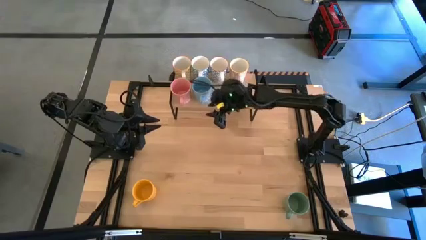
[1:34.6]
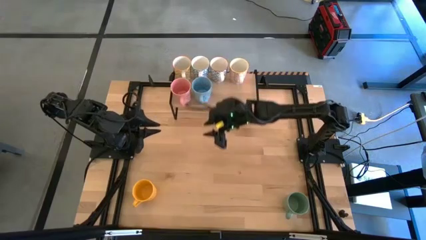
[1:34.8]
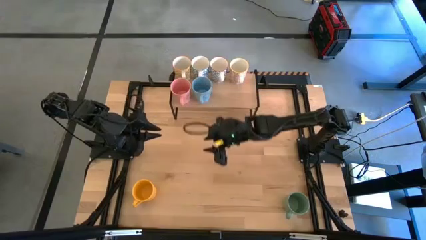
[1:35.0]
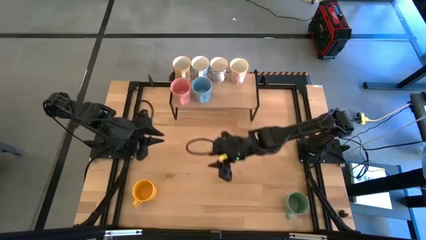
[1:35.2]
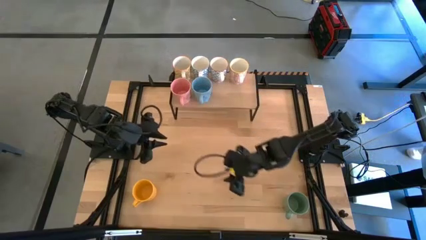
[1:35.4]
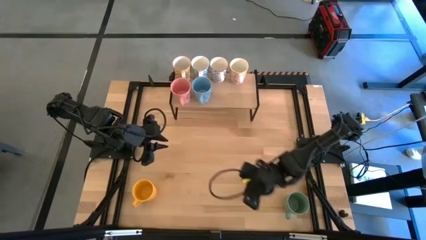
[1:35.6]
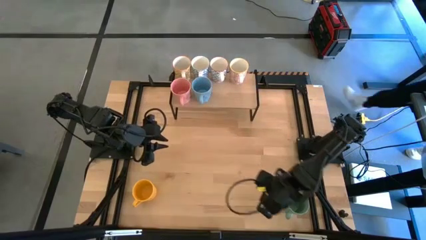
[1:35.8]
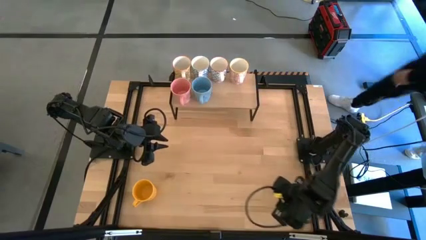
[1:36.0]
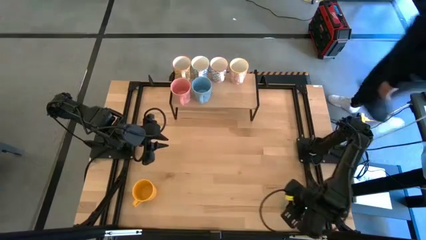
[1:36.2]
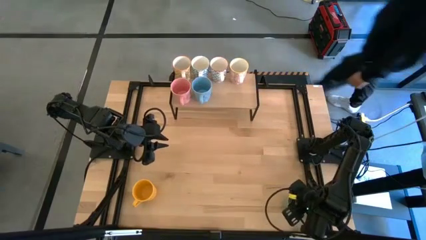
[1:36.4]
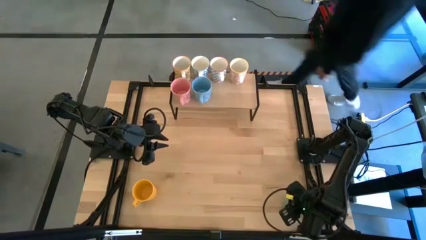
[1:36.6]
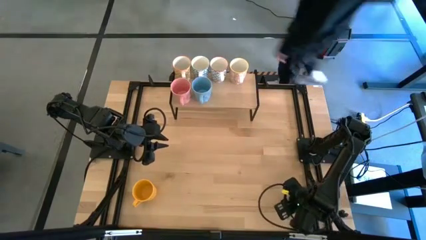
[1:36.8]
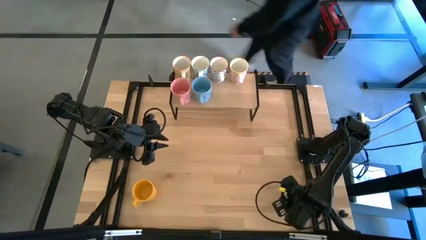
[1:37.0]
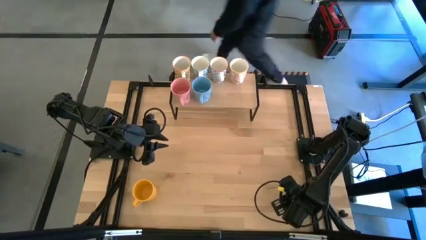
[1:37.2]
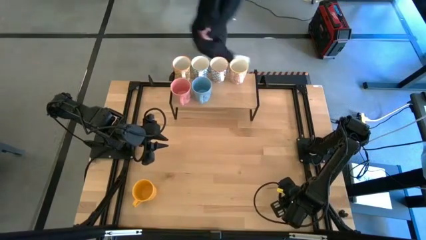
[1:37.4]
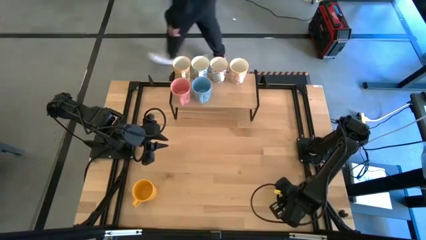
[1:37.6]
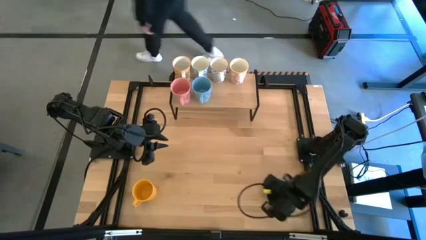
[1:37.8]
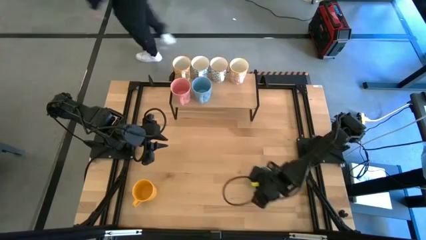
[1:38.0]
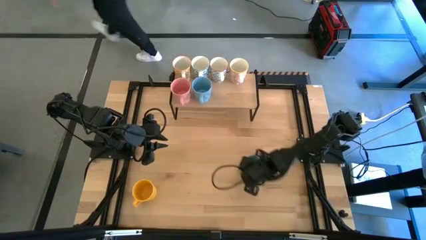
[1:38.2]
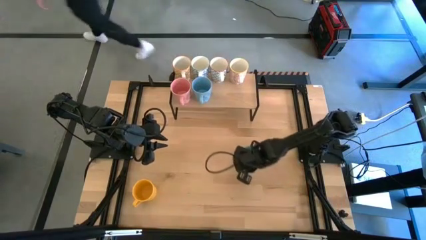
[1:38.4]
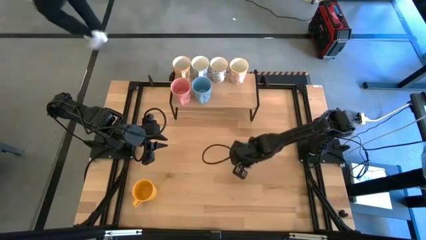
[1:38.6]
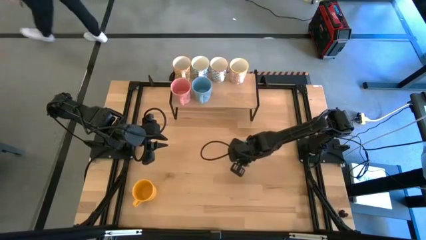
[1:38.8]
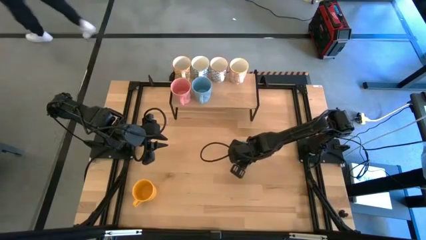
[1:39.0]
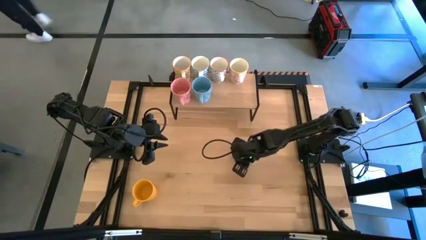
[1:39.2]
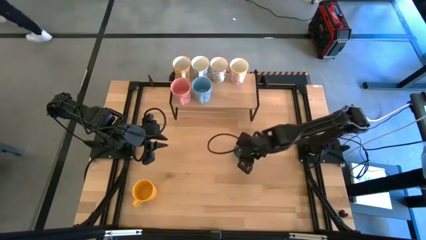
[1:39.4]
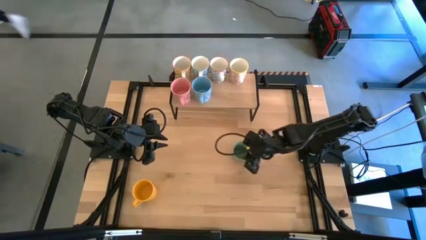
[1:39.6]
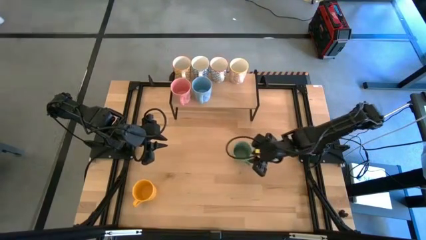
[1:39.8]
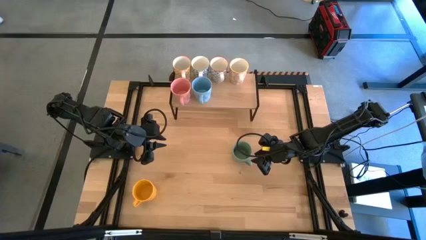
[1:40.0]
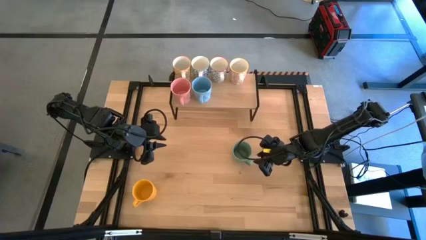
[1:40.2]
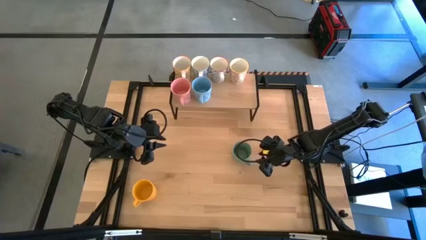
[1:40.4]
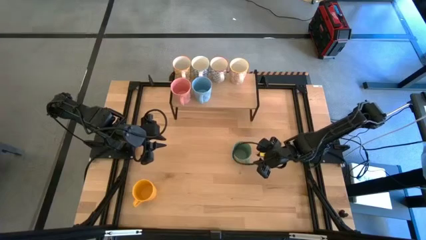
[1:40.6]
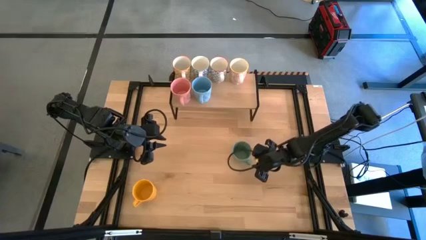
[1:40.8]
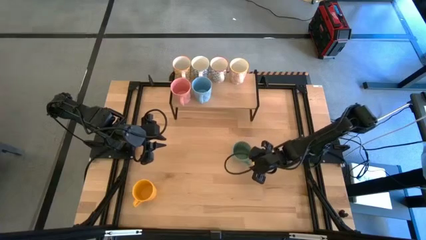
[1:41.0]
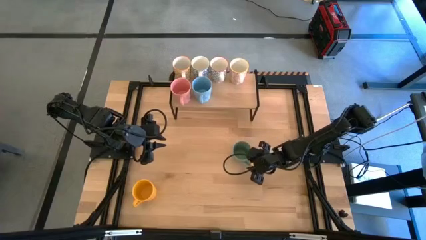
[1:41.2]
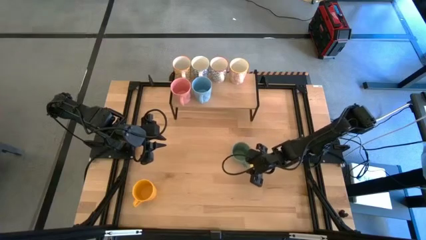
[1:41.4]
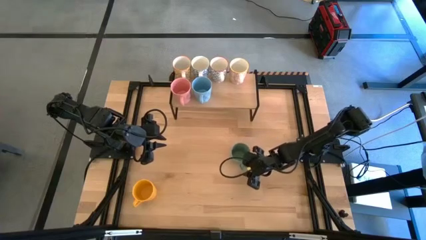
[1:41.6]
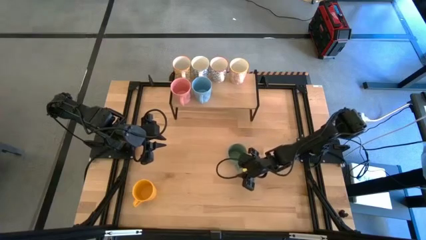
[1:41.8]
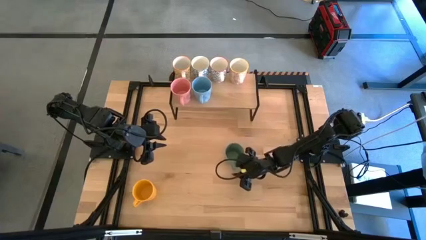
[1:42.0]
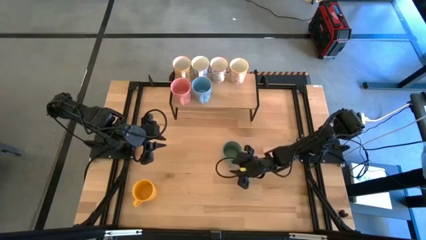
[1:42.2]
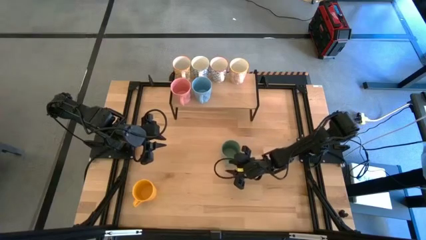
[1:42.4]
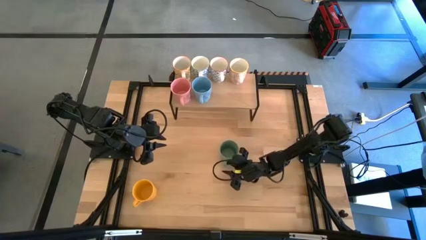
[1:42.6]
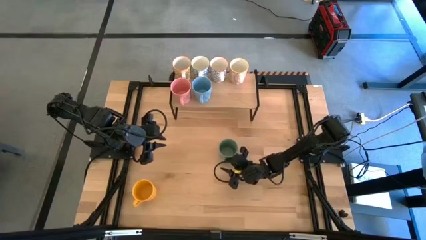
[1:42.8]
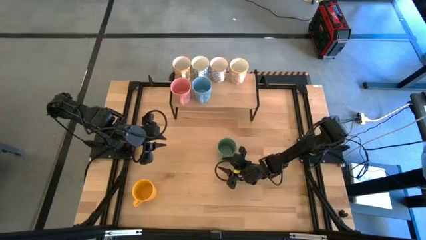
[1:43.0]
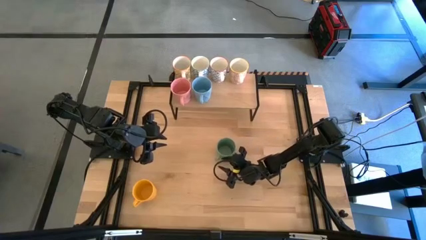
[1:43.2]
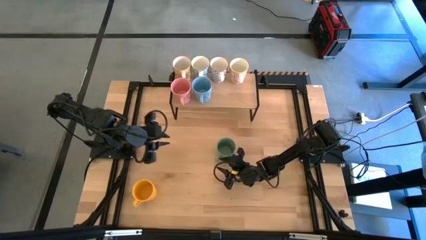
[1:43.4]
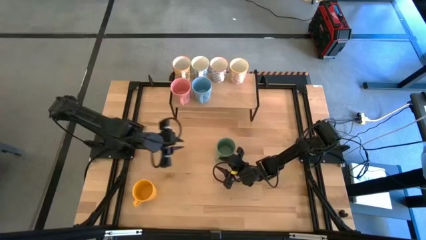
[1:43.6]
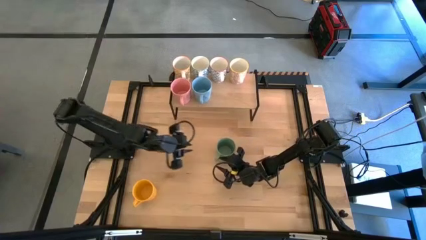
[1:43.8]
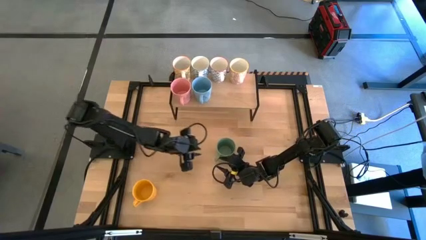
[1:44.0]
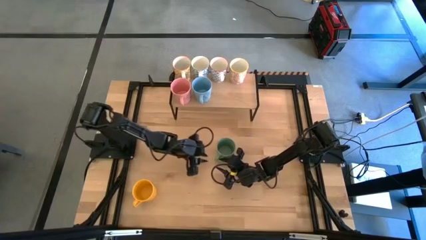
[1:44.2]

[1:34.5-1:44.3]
Task: Place coffee mugs
Put the green mug on the shelf

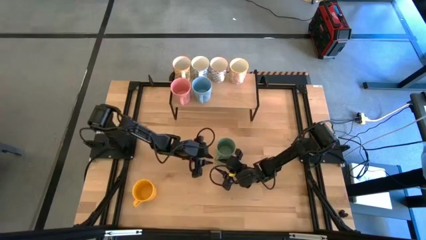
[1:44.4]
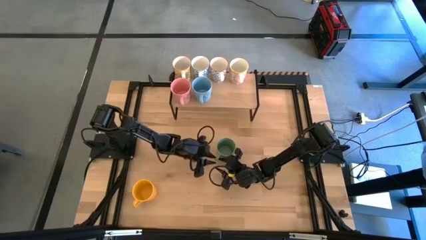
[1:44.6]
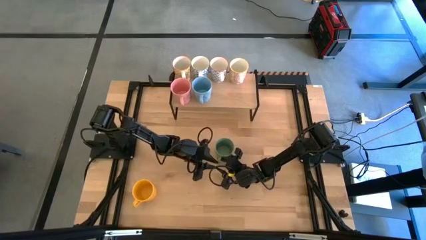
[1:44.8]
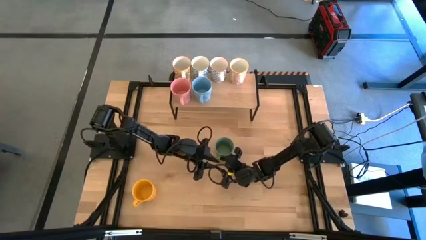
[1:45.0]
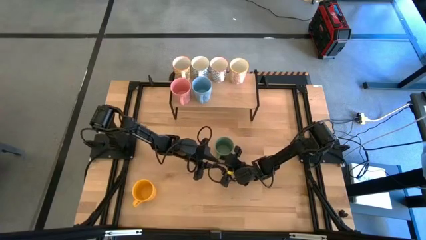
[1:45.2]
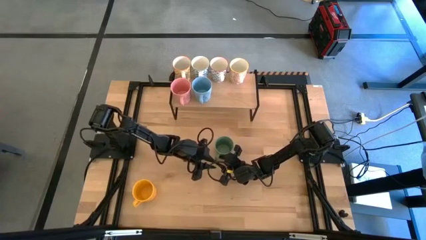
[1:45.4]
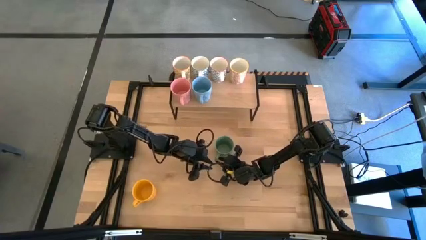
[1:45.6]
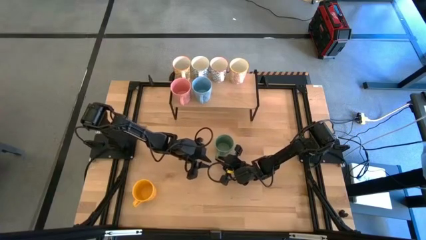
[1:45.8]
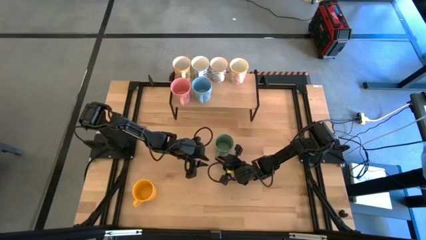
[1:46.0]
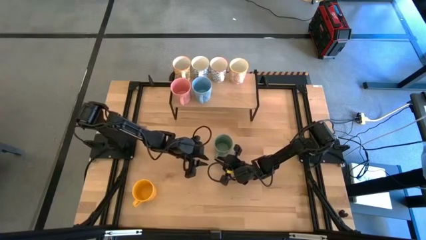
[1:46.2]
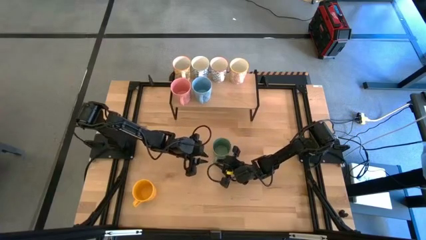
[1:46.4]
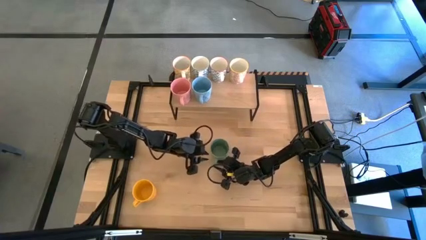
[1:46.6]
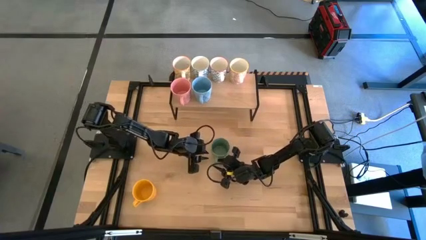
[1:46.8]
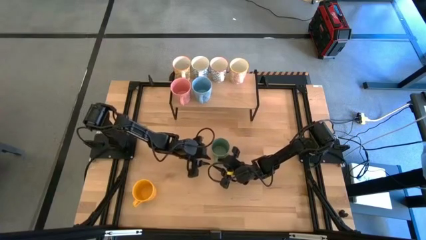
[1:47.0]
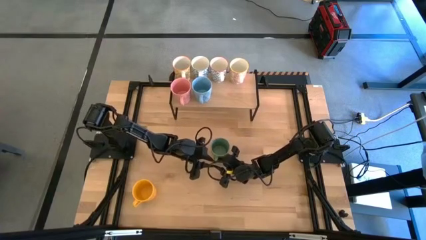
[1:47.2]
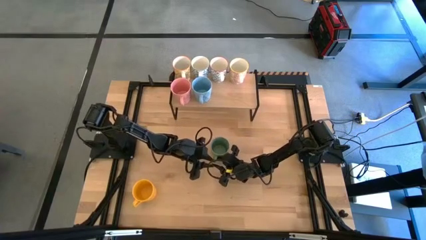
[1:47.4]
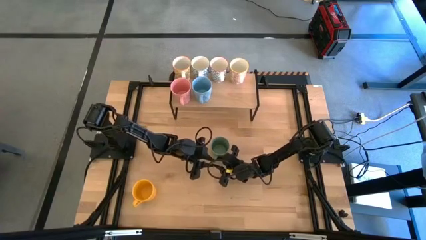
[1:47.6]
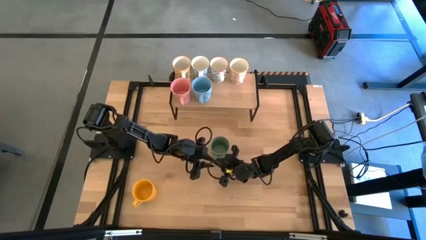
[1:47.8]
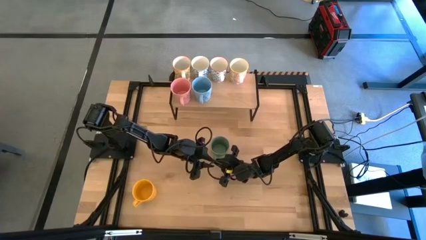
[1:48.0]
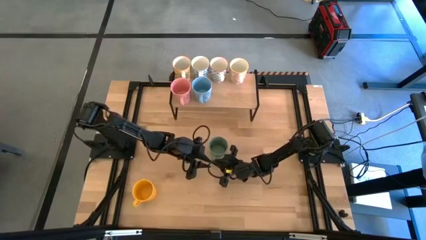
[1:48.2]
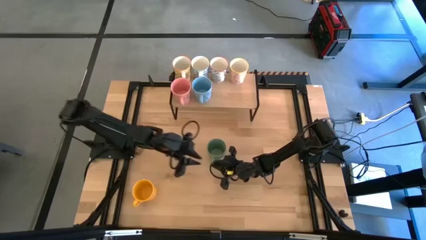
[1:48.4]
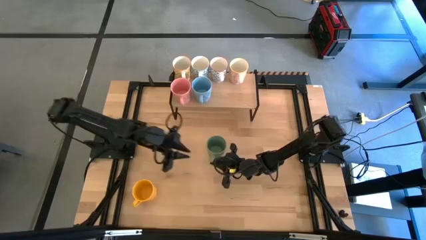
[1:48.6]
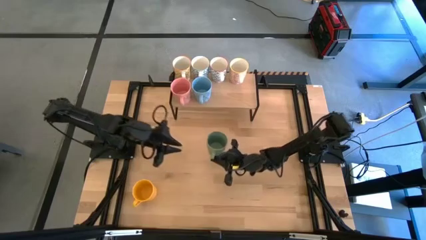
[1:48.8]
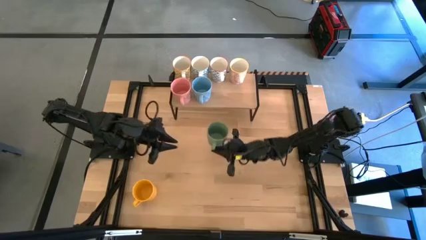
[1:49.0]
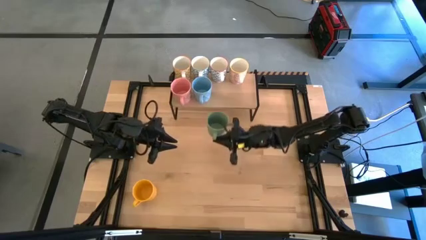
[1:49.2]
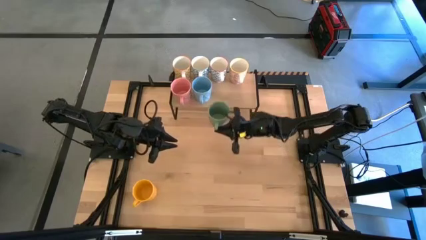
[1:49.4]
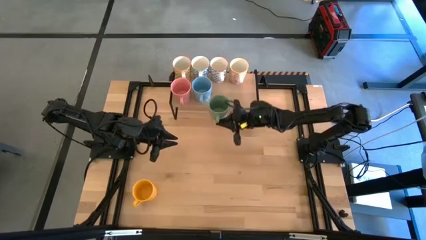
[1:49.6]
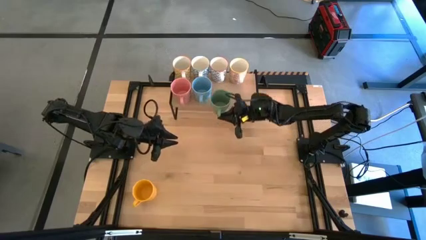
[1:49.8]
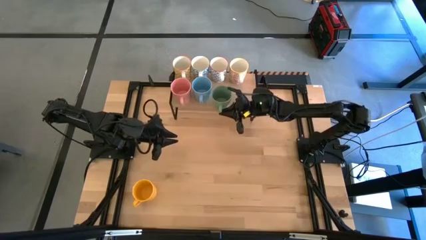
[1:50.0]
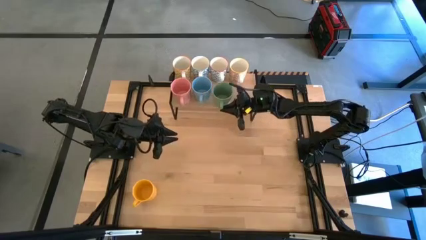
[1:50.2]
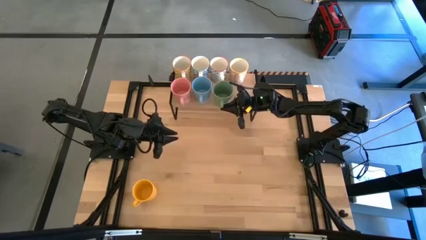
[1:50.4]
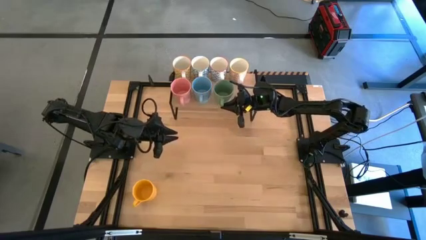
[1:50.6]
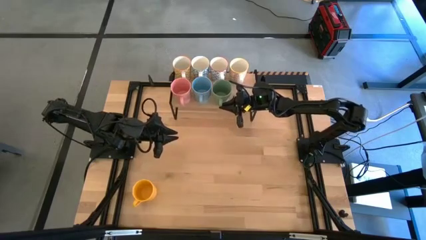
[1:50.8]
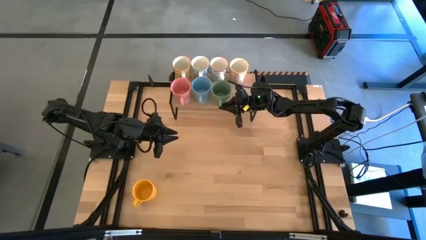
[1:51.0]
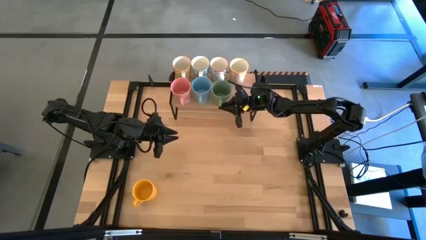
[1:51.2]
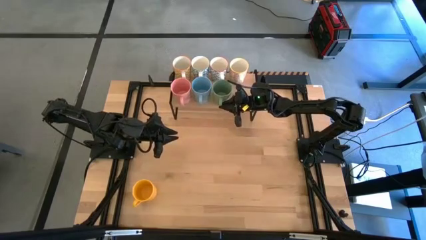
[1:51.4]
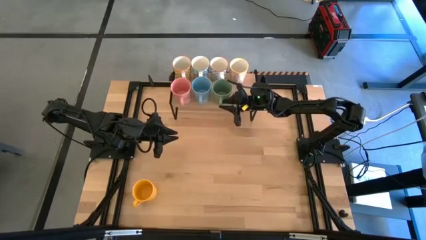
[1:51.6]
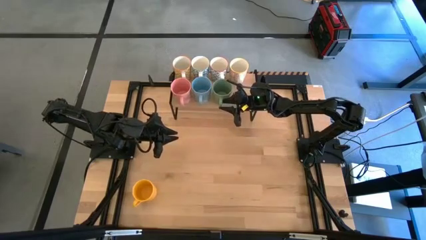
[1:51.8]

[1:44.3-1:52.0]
Put the green mug on the shelf
